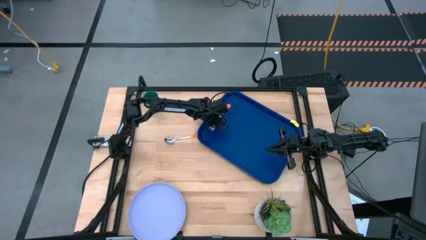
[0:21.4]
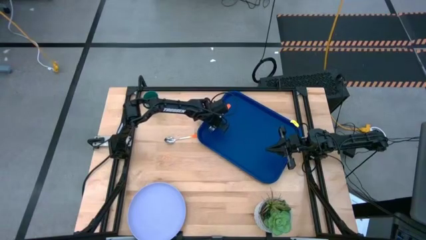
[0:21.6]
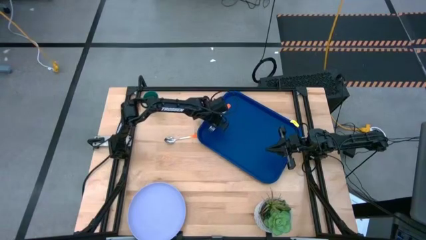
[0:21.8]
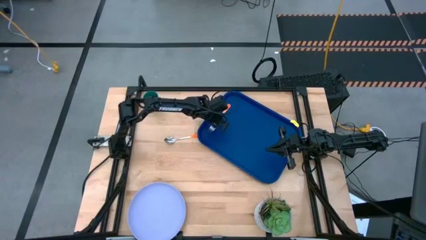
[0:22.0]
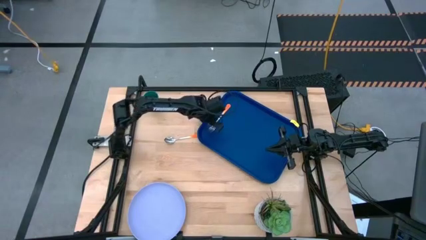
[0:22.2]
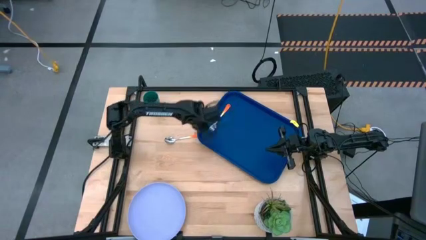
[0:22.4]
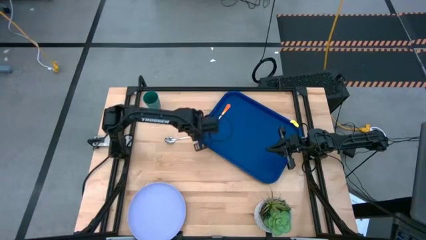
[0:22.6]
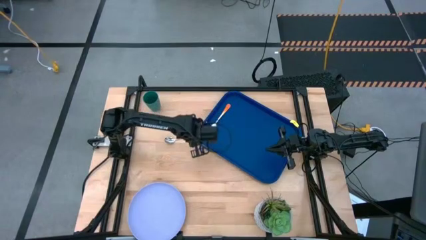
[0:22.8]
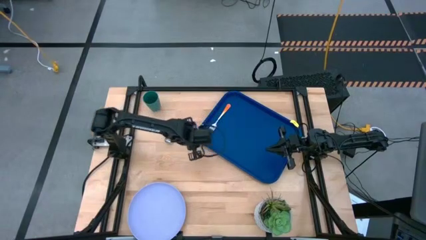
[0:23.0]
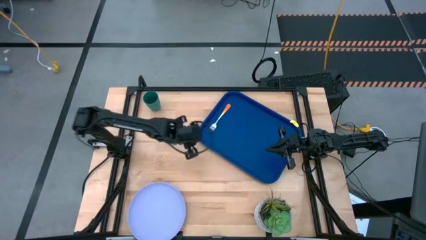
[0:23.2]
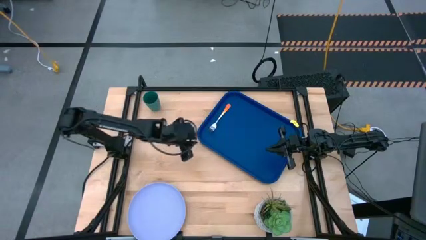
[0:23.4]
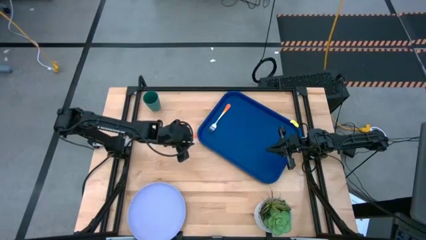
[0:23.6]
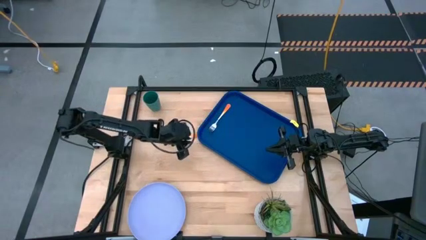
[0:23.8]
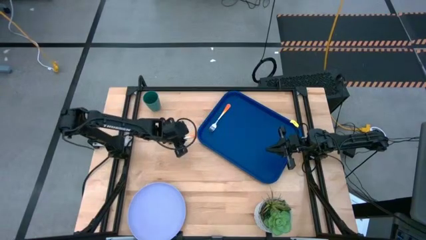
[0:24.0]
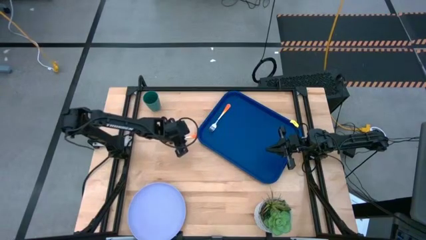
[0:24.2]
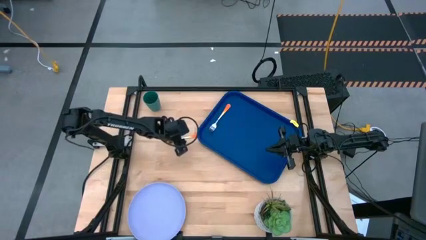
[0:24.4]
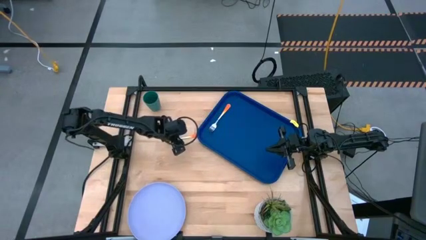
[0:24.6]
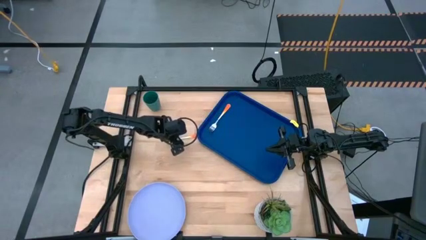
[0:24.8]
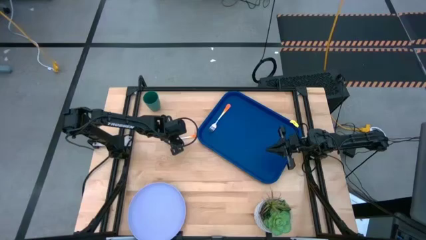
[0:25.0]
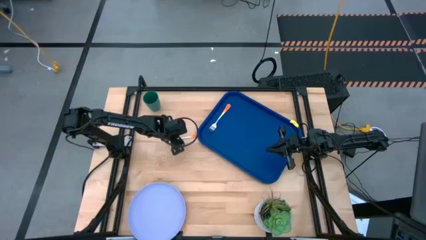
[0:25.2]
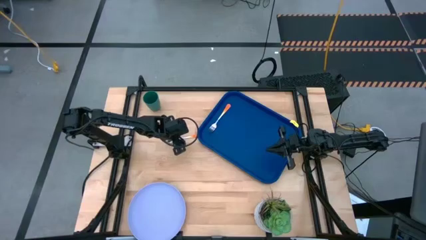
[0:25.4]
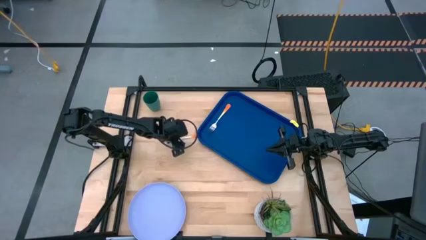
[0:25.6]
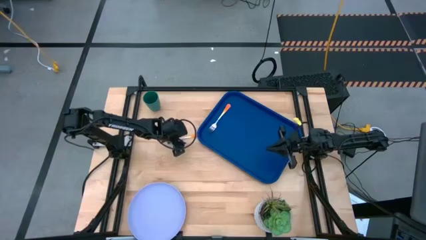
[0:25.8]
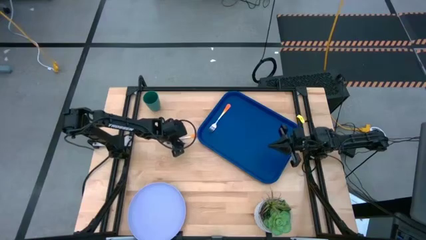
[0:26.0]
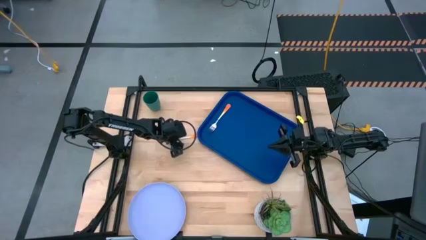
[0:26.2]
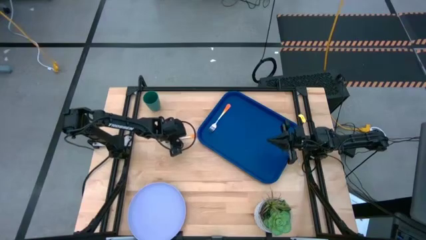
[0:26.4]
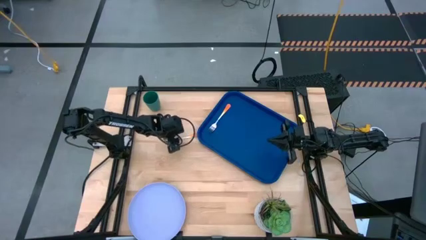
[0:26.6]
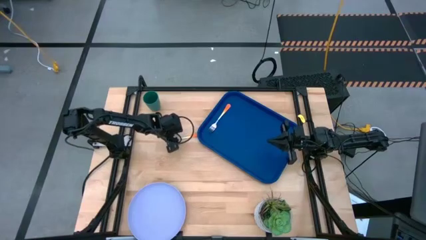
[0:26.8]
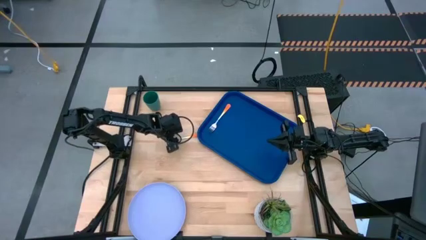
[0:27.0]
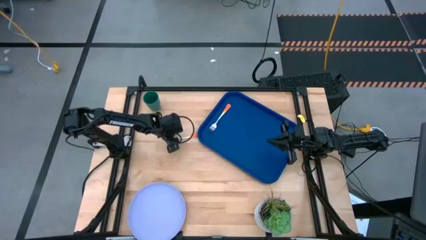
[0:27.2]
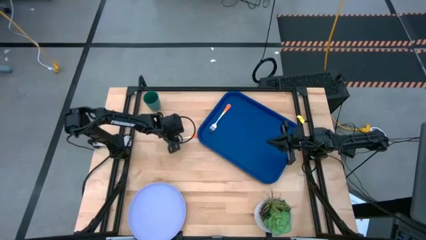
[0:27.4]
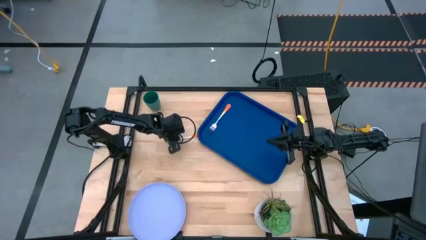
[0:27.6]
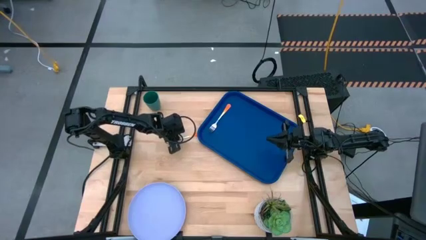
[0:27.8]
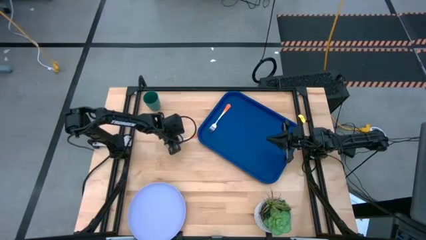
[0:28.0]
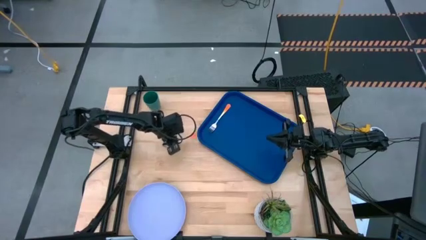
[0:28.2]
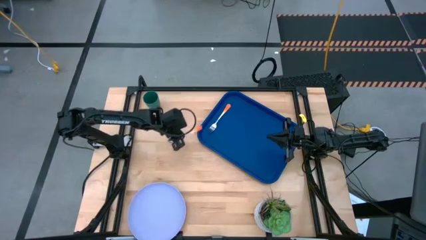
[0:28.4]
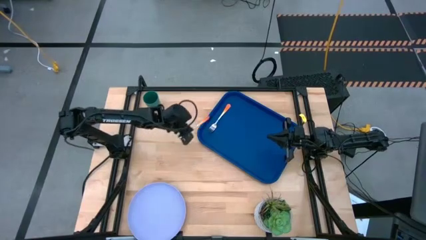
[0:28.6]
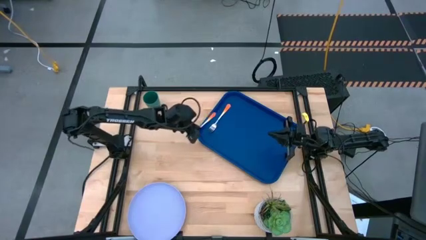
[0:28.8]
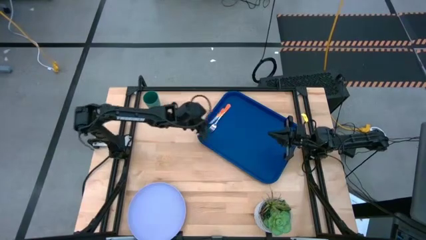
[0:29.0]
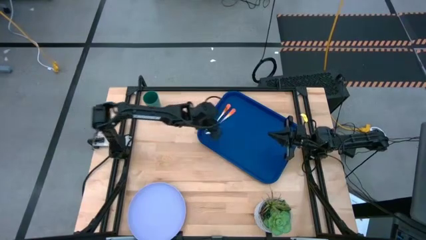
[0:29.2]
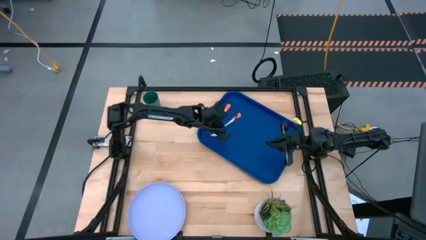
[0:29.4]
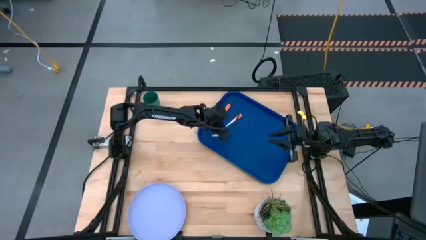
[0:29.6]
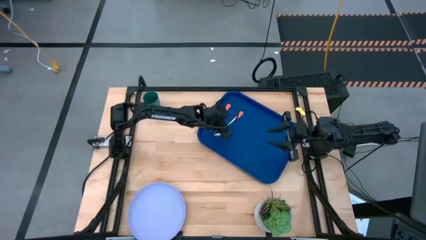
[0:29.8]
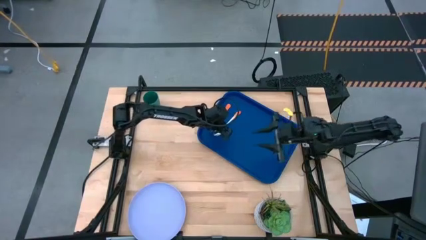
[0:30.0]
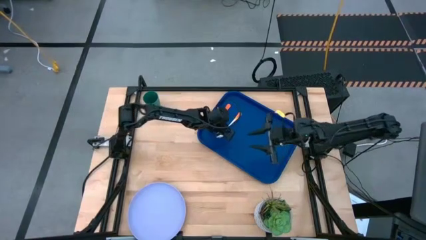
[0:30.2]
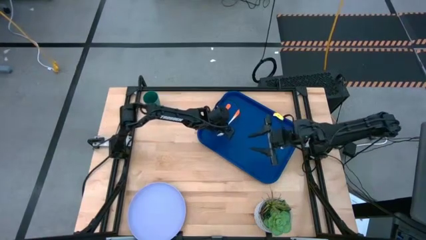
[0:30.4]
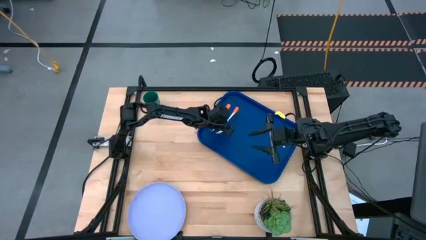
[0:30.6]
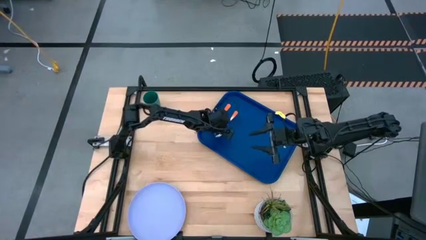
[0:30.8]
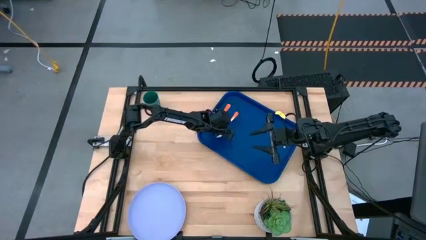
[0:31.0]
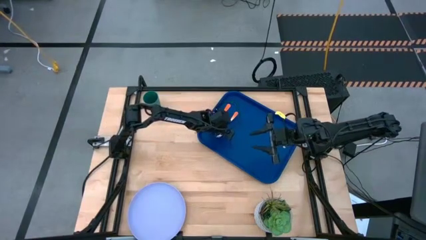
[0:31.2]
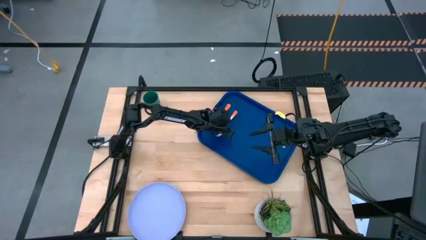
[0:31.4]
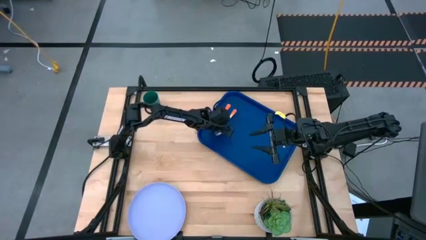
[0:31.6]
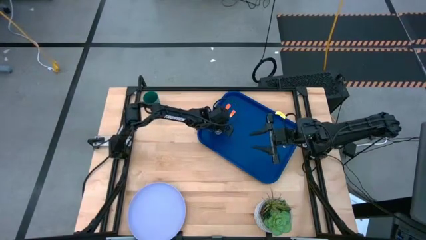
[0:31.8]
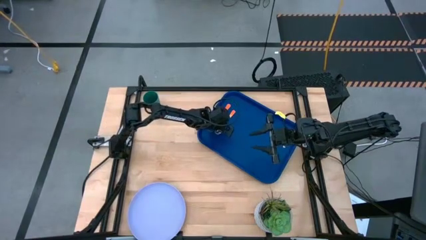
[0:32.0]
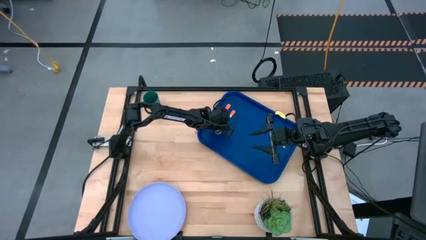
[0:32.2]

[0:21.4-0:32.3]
Task: Pick and place plate/cup/fork/spoon on tray
Put the orange spoon on the blue serving tray to the left of the orange fork
